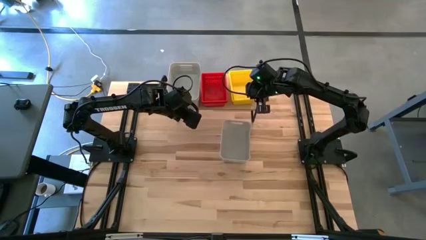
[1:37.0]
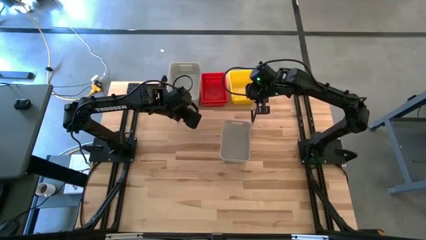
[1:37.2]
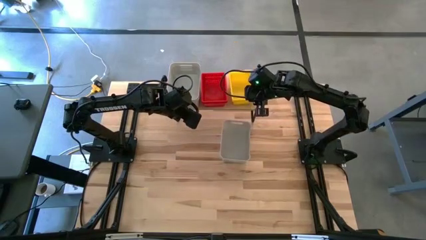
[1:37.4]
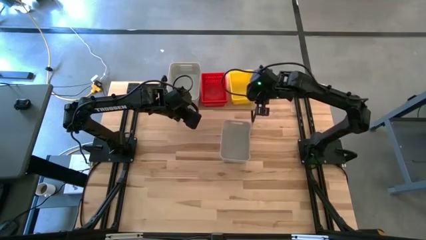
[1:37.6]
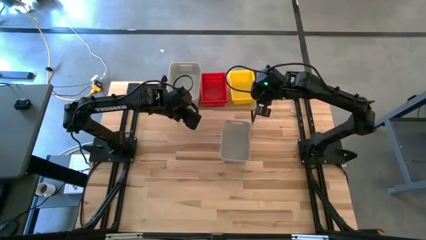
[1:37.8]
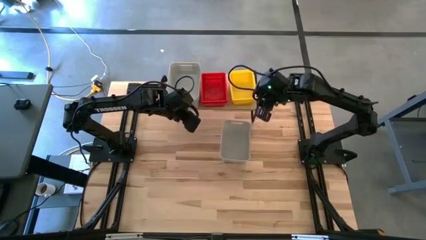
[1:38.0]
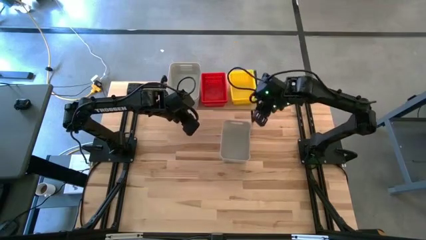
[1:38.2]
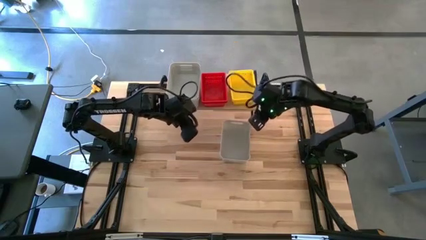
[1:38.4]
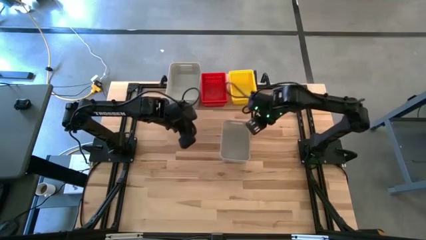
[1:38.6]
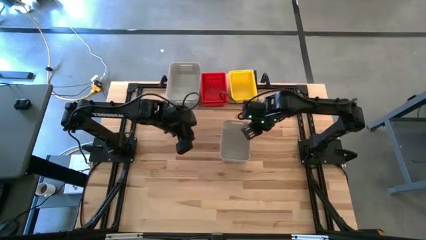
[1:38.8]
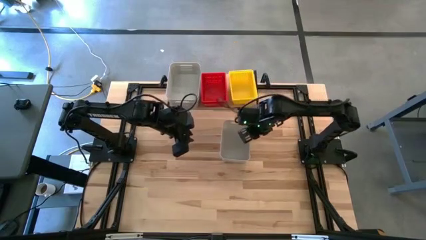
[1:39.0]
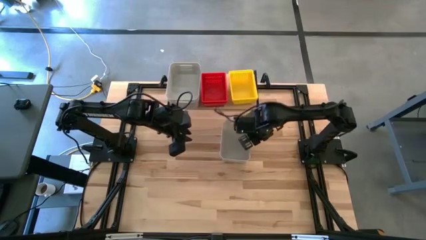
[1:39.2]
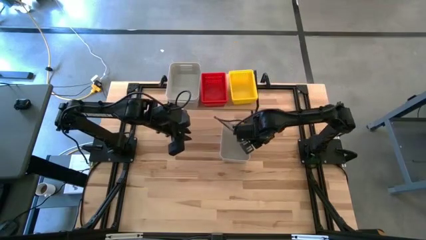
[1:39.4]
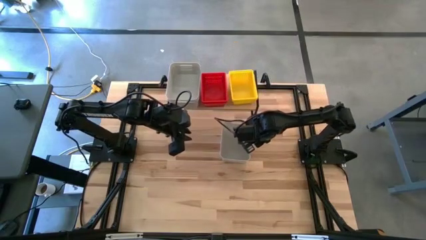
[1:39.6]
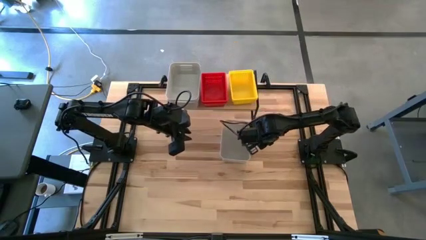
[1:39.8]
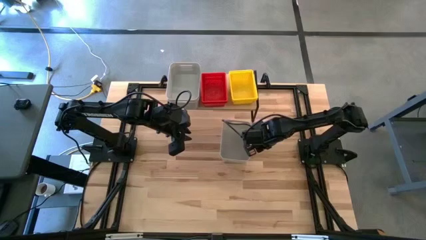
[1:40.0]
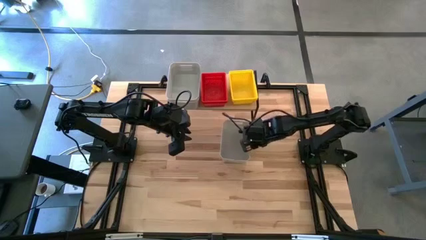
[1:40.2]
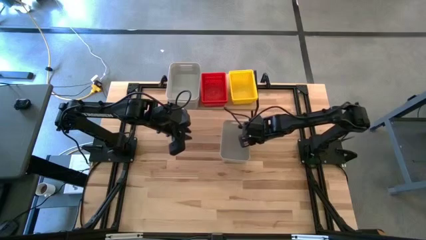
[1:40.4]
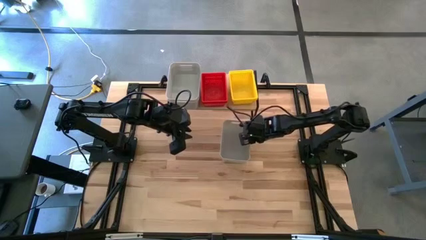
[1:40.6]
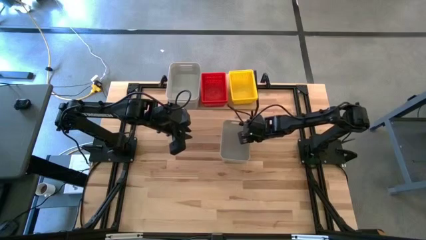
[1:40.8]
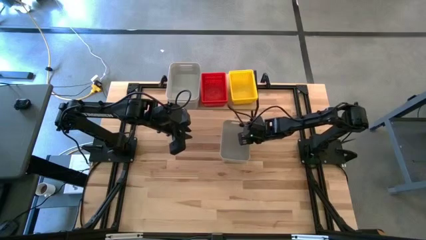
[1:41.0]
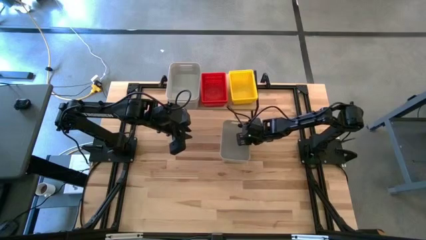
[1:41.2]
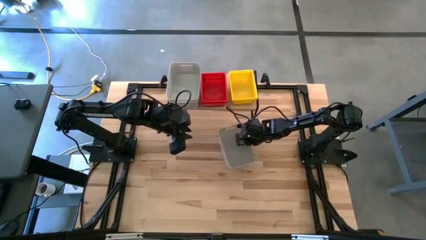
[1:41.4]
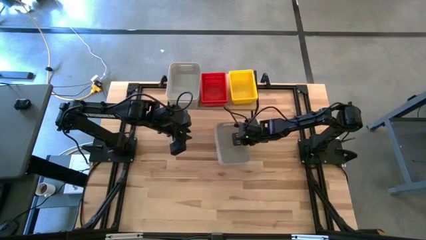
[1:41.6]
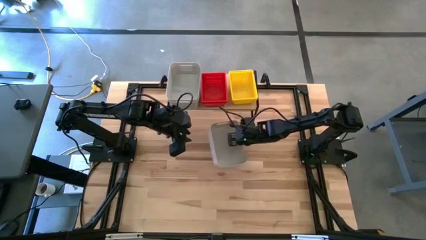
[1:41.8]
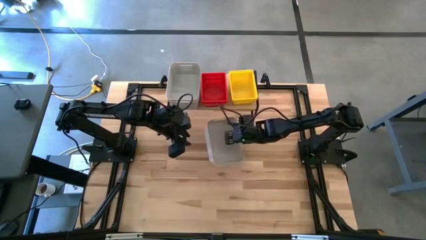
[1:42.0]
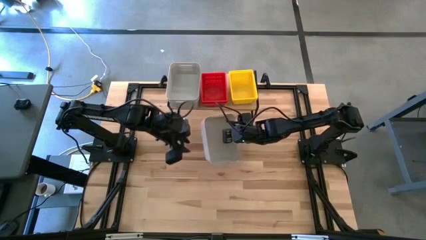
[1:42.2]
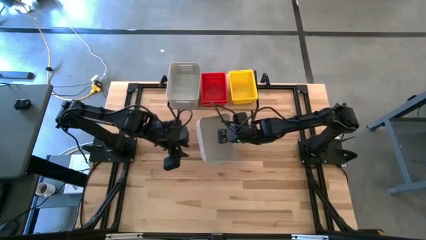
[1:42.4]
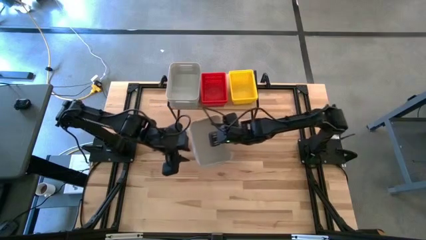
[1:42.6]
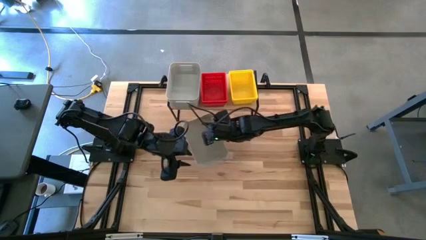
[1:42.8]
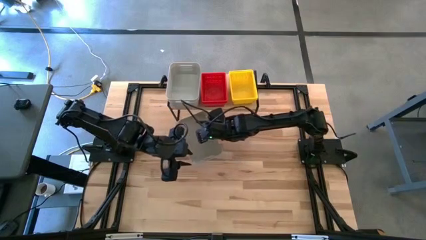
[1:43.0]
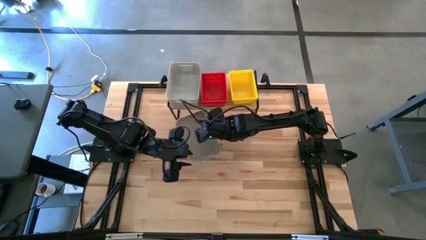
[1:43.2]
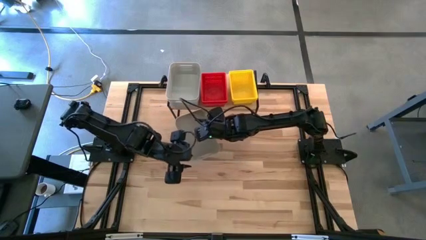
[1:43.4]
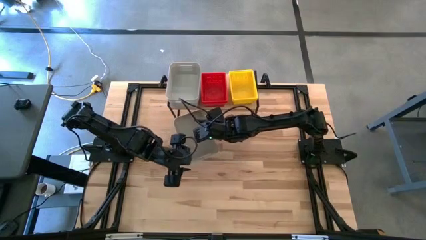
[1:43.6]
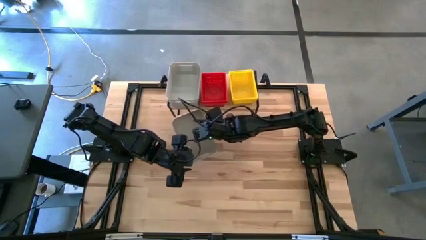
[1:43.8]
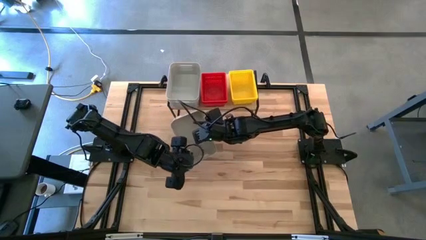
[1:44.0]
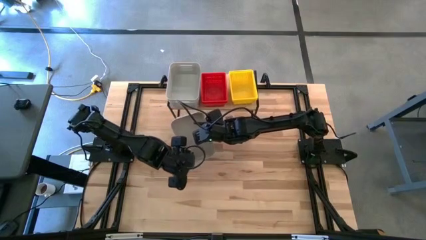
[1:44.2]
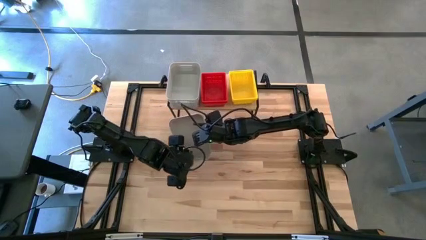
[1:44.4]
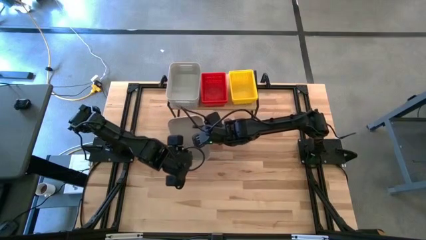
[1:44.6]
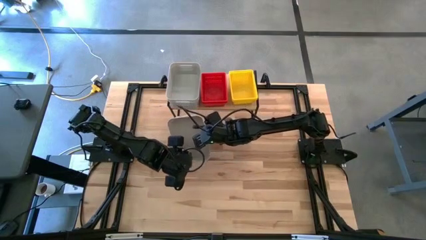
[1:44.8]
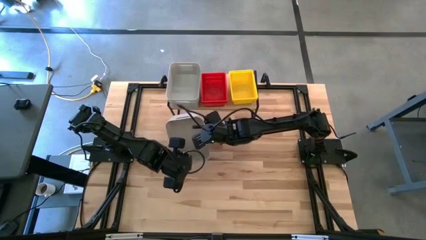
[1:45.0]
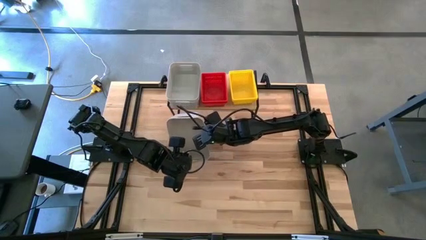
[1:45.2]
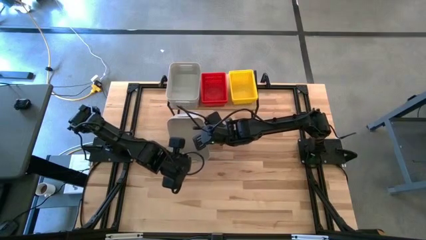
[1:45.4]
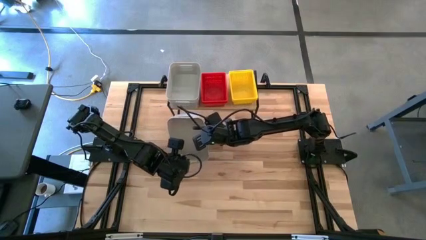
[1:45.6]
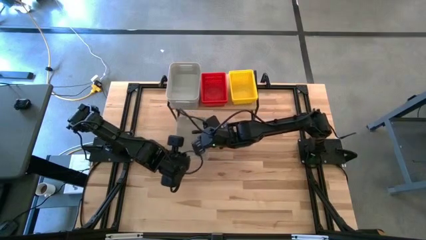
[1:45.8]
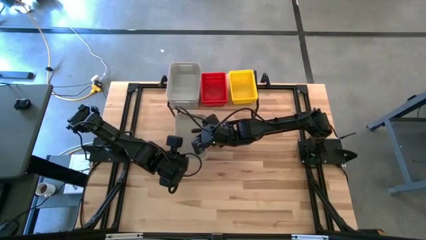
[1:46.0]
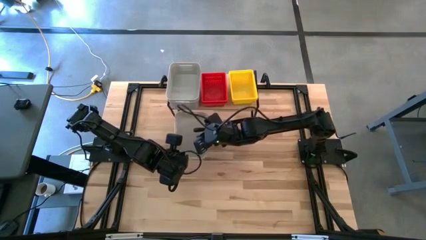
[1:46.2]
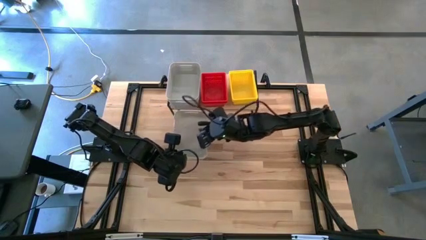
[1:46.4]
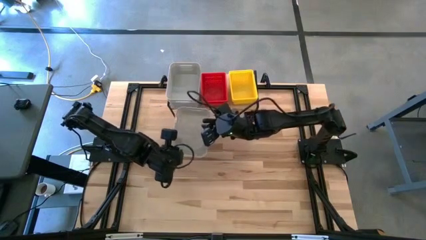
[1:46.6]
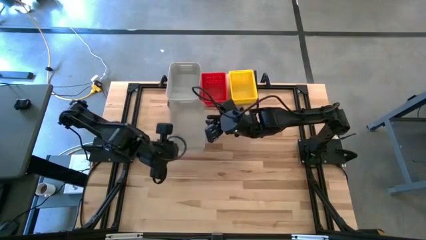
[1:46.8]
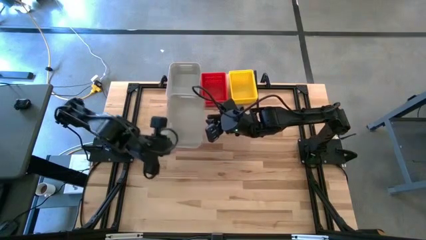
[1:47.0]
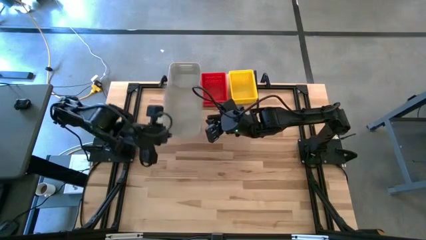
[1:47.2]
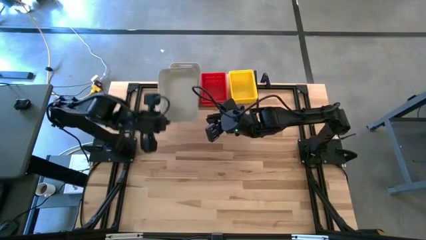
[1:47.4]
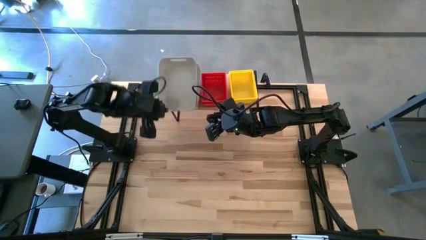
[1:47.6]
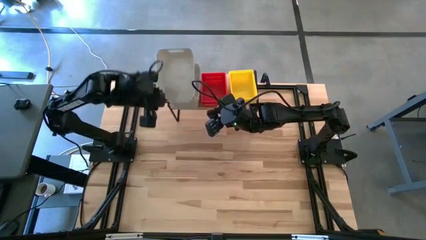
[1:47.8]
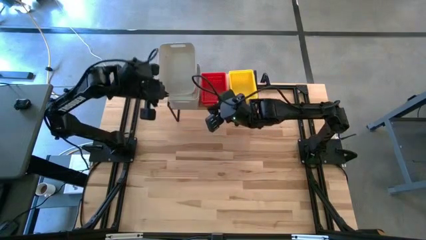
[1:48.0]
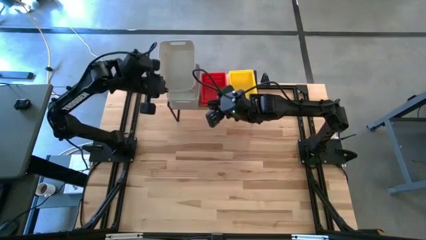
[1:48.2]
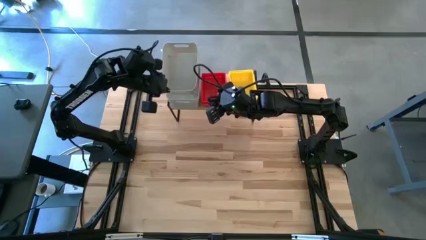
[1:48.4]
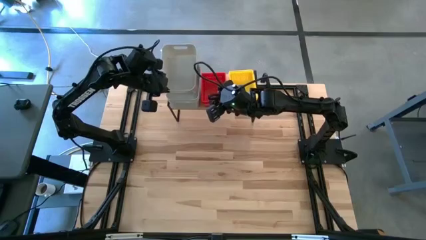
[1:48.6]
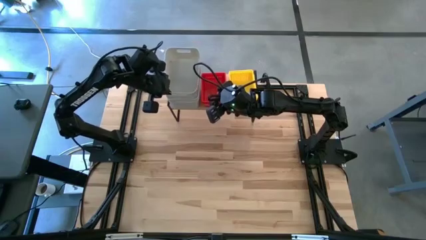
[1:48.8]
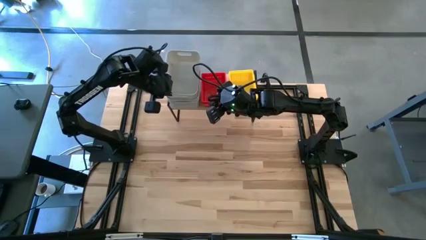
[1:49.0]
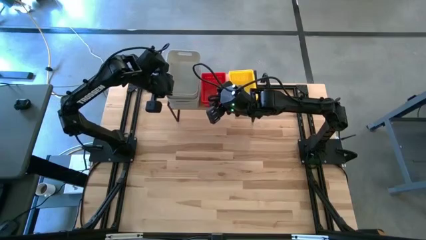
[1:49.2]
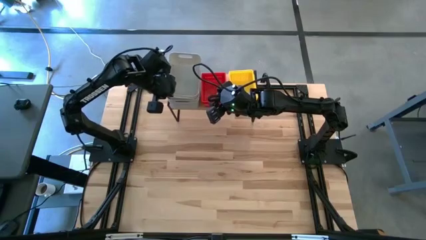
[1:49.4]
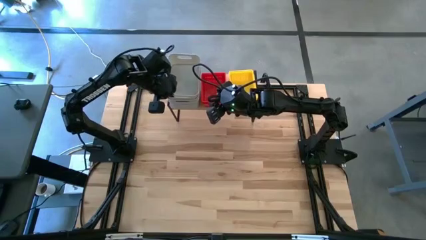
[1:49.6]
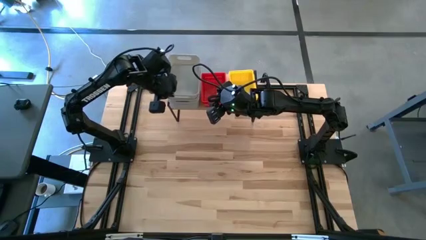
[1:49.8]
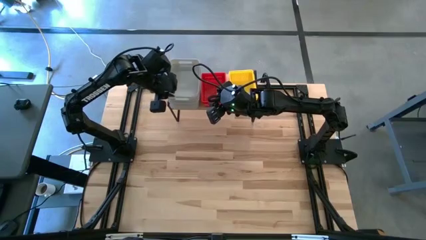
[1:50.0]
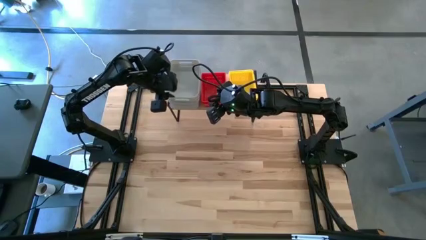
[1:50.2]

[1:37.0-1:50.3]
Task: Stack baskets on shelf by color
Stack the gray bin on top of the gray bins on the shelf

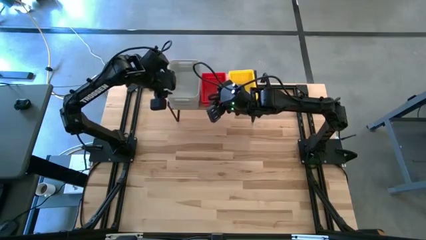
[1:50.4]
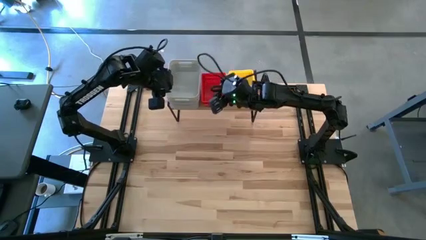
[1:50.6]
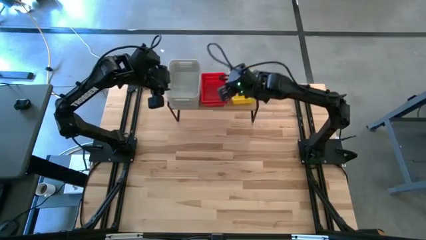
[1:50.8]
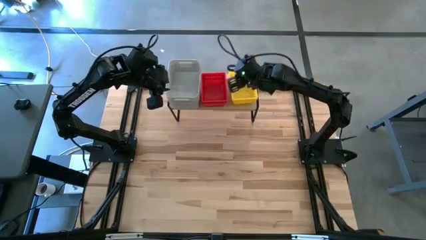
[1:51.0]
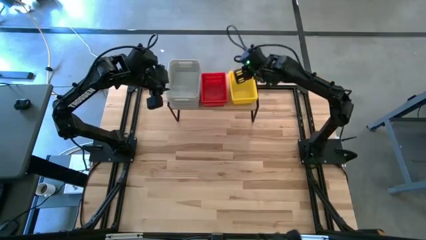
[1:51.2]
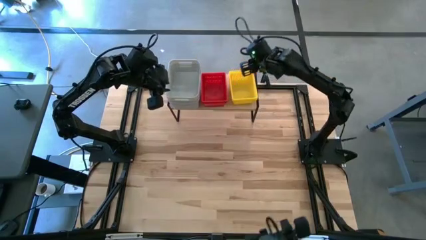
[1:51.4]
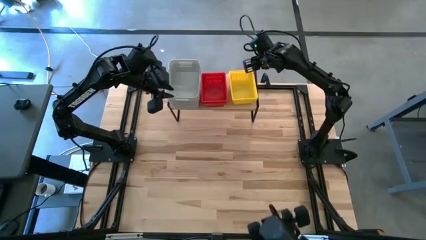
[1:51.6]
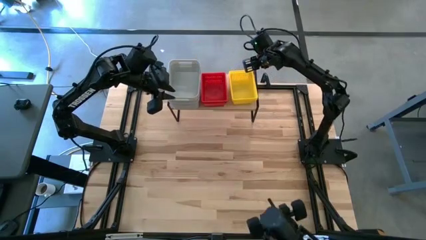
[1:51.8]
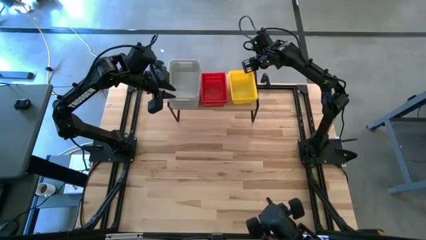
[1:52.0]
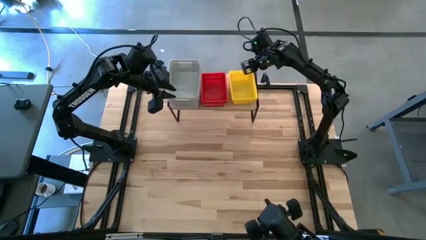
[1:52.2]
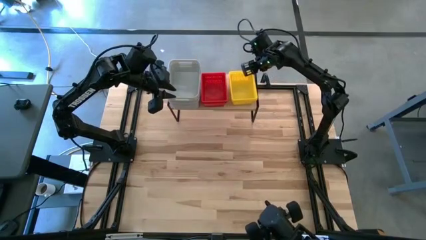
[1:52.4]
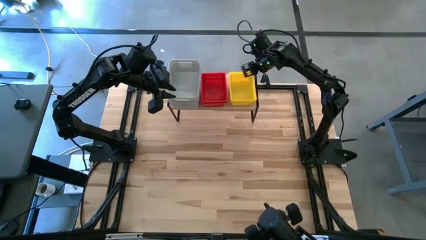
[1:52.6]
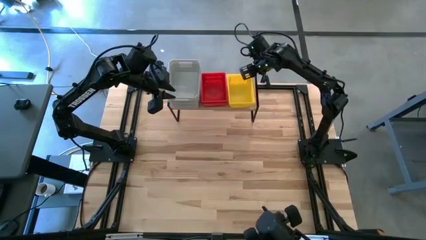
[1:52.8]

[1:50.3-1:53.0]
Adjust the stacked yellow bins on the shelf

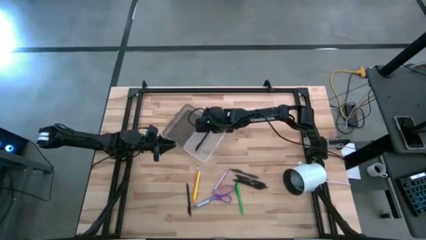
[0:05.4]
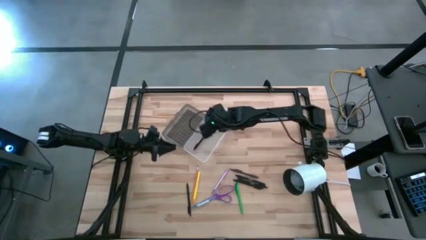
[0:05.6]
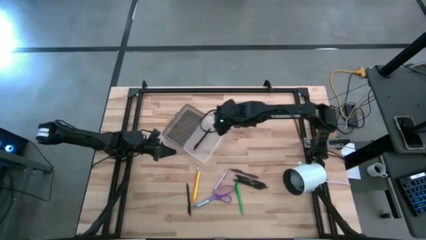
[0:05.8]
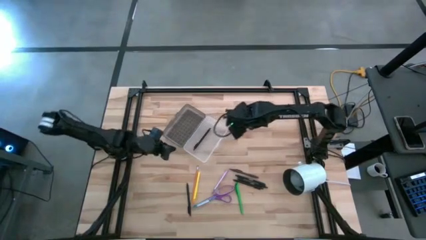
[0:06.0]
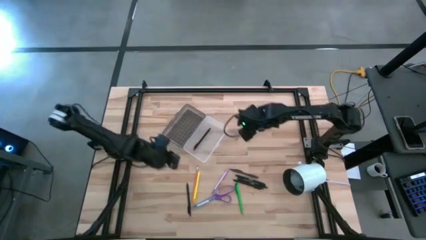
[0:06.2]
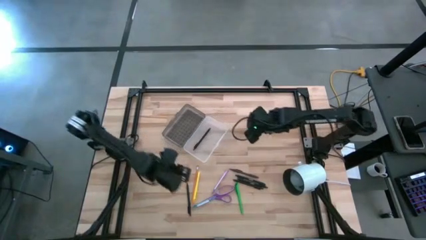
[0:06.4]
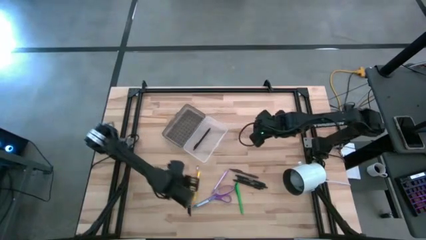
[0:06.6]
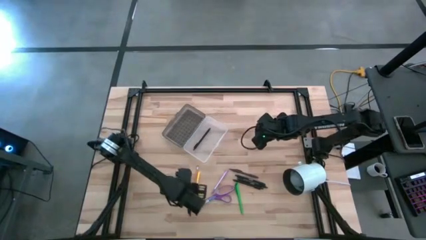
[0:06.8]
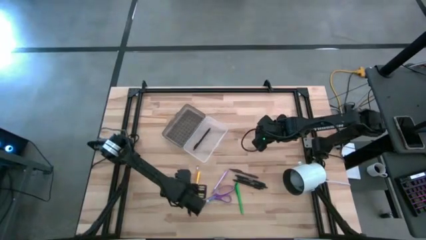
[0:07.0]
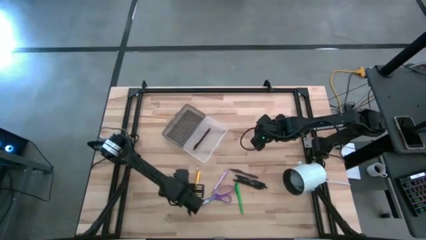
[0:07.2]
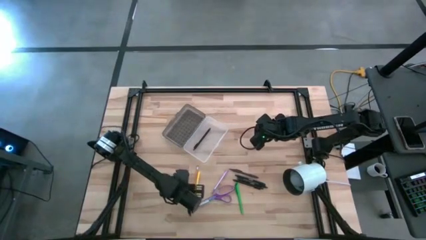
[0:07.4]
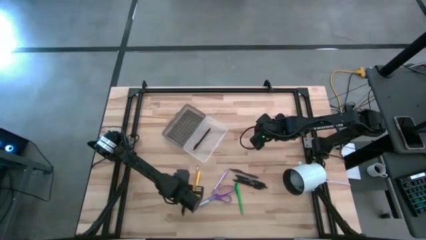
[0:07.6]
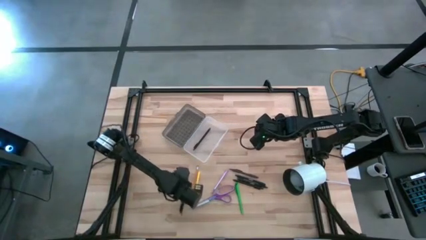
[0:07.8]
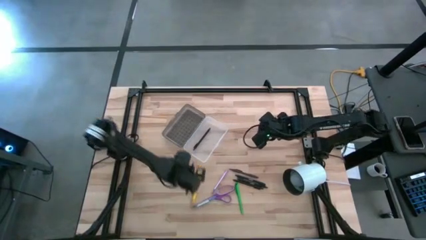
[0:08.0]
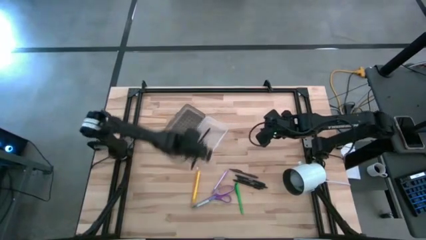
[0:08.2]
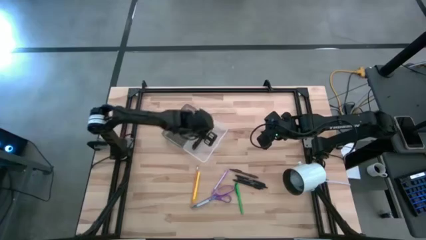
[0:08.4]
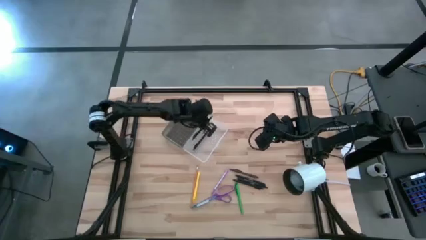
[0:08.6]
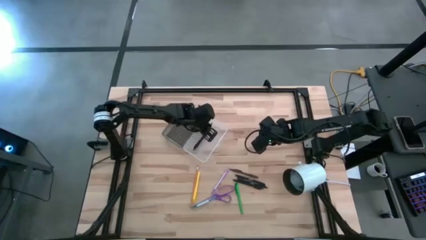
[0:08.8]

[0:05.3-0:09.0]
Task: Pick & place school supplies into a supply box
Put the black pen into the black supply box
